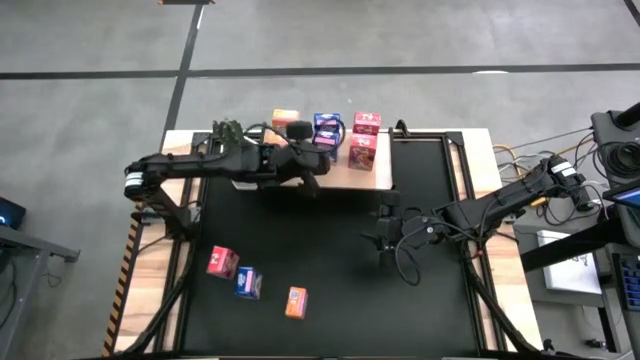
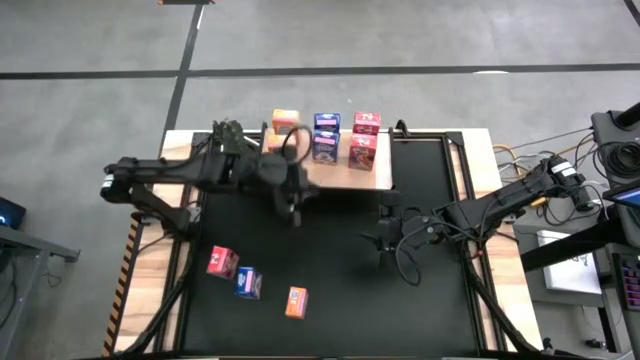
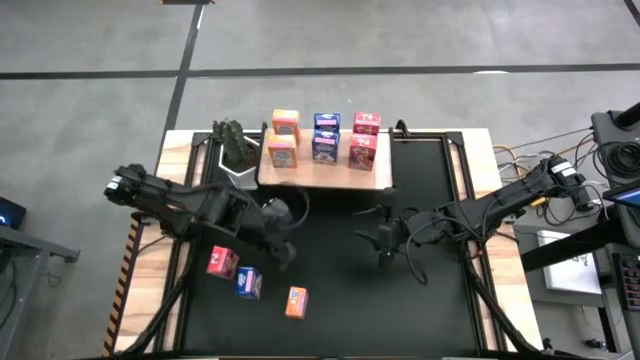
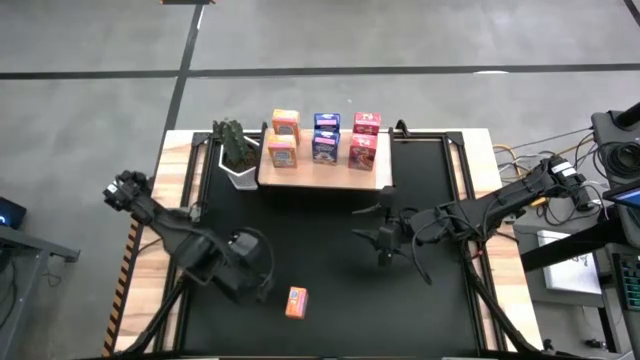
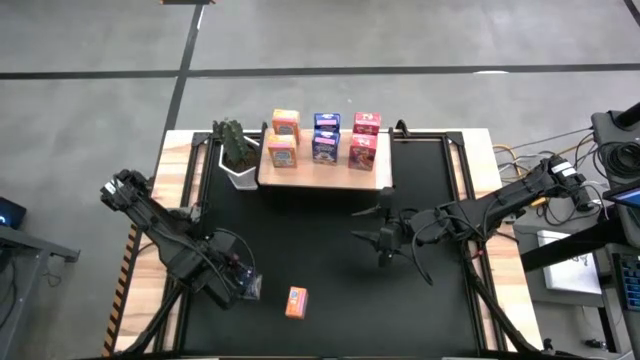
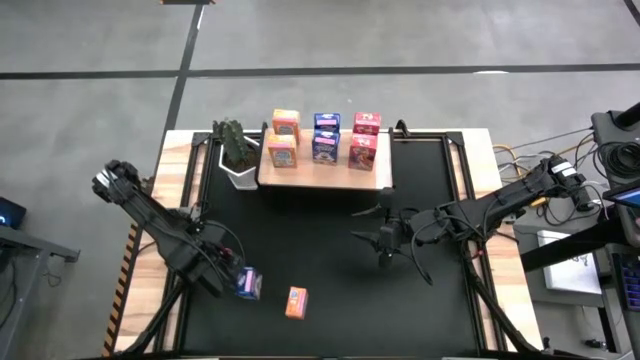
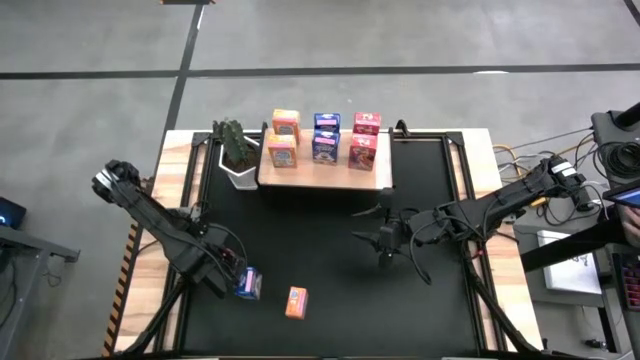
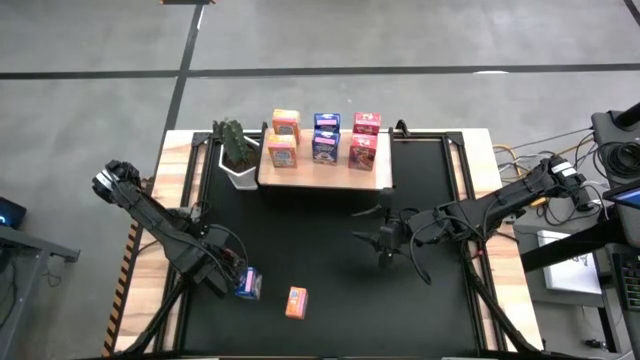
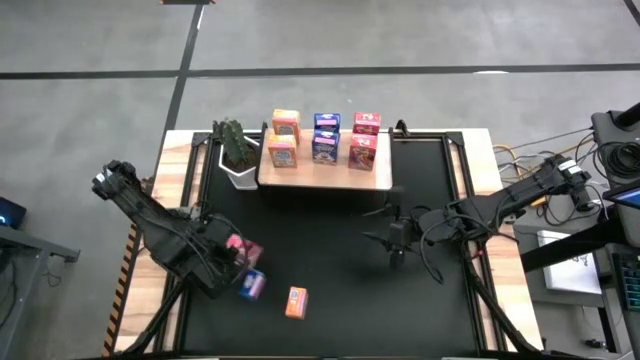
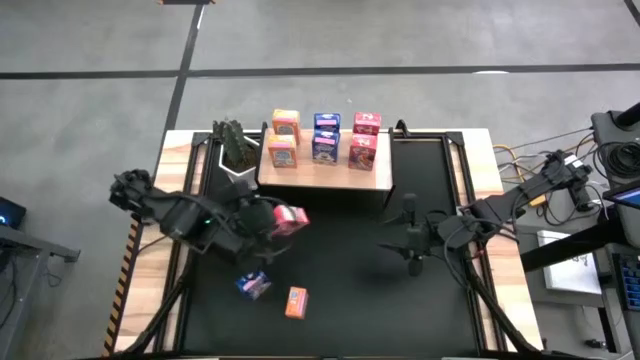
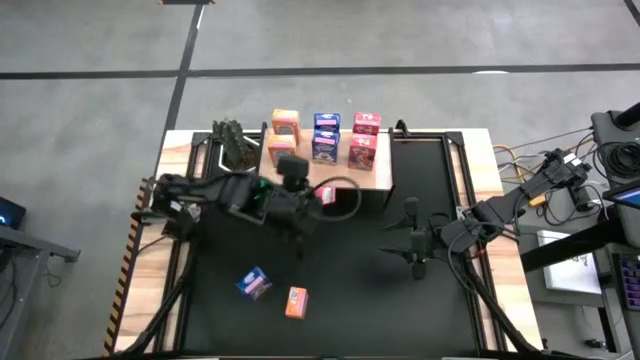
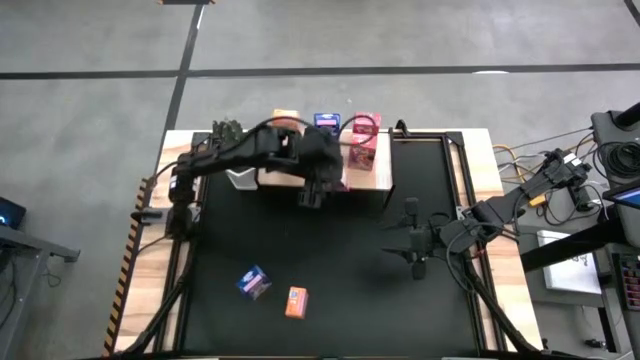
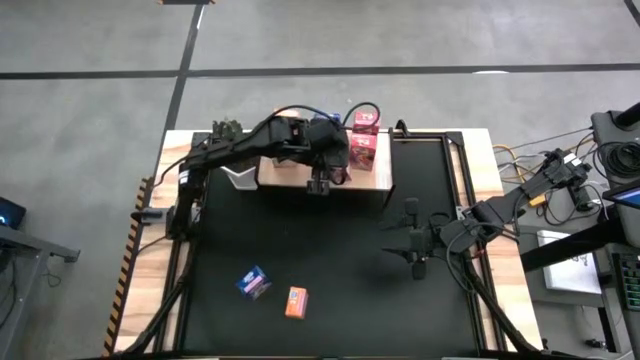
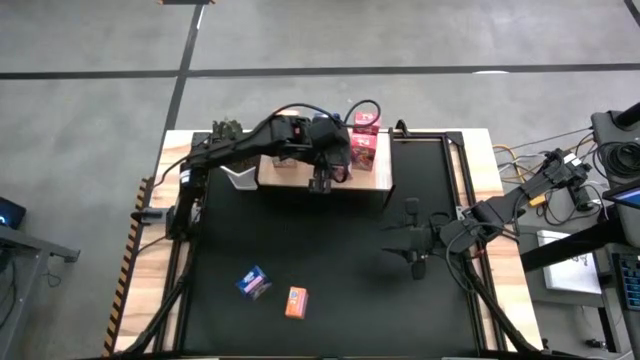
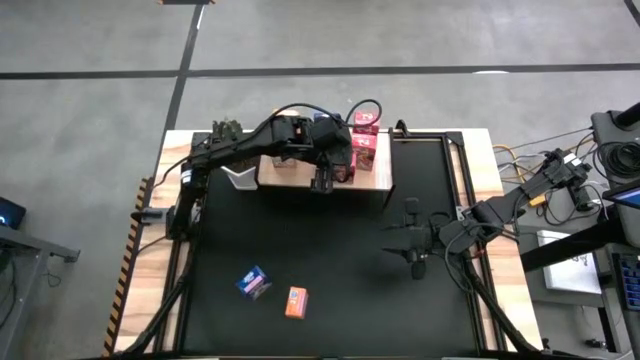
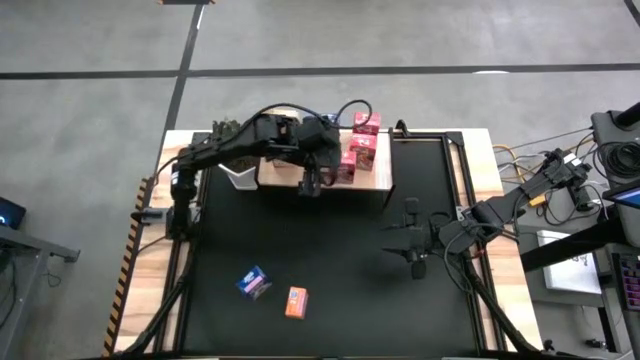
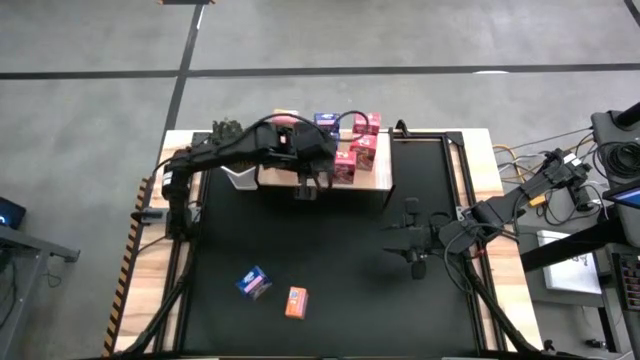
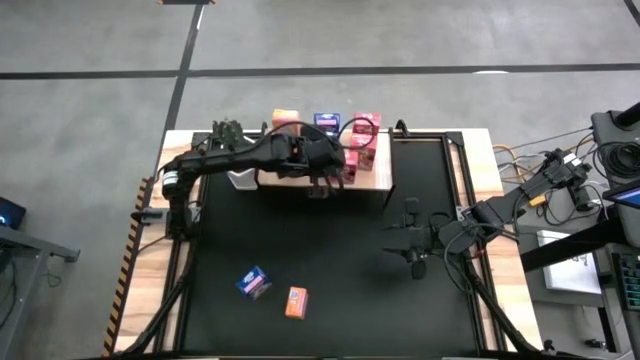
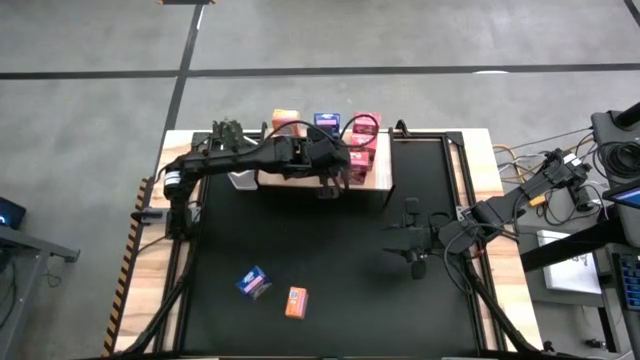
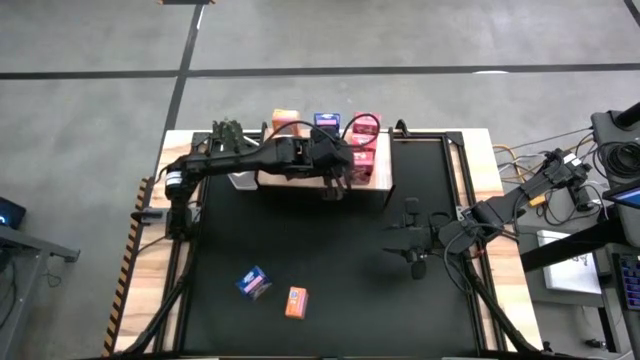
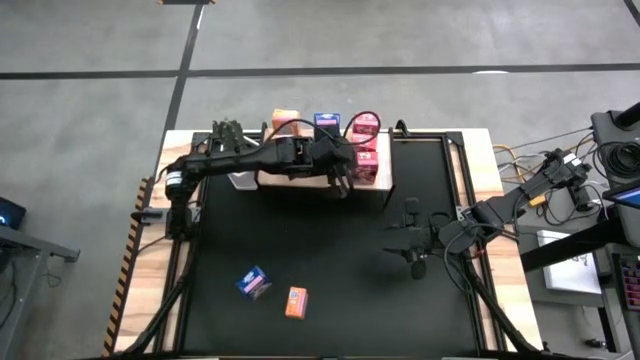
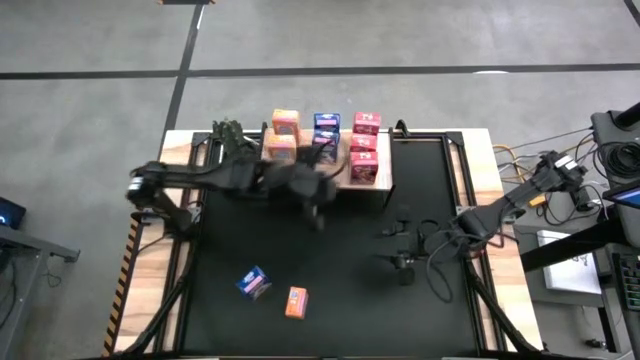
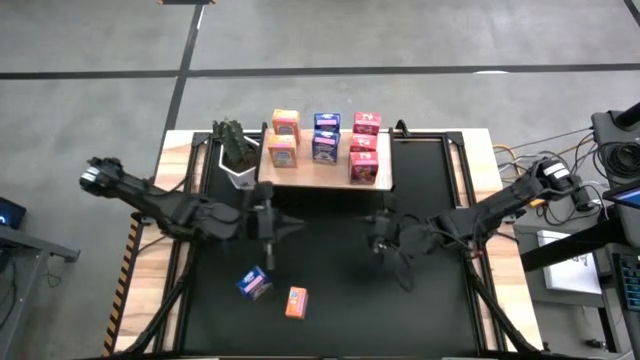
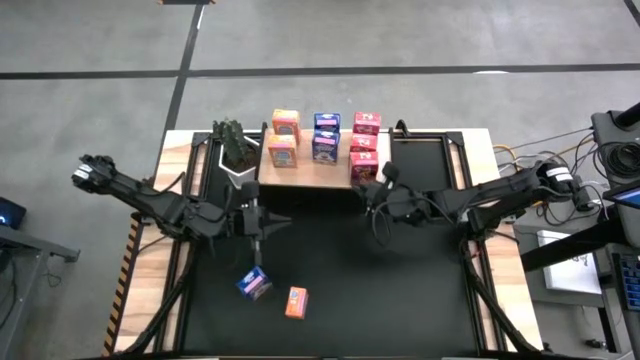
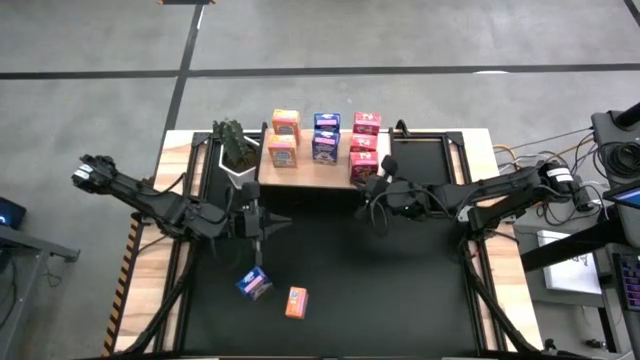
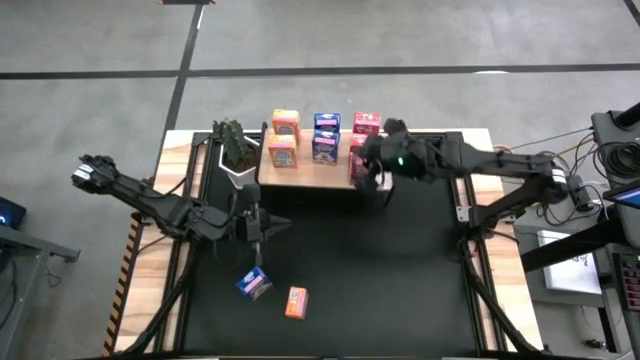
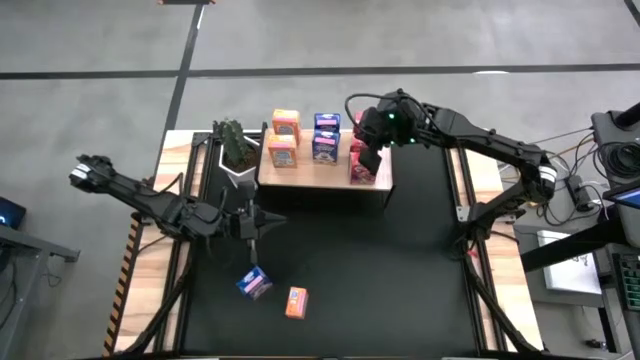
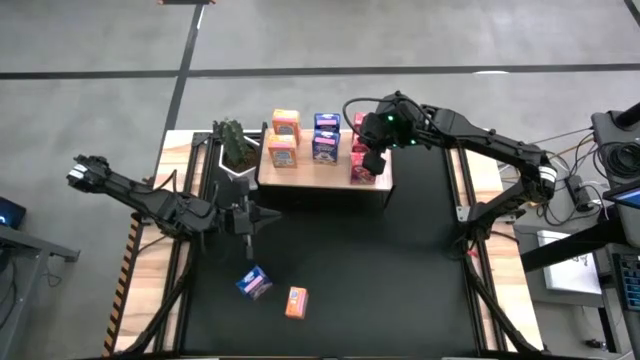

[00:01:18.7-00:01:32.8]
Task: Stack cereal on shelf
Put the red cereal box on the shelf aligned with the other red cereal boxes

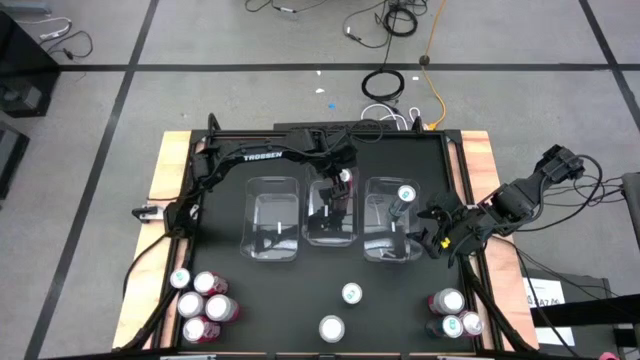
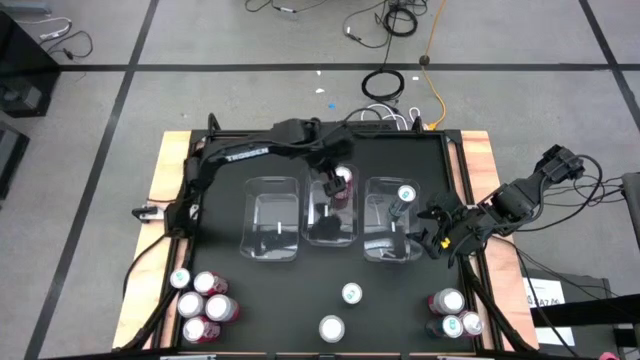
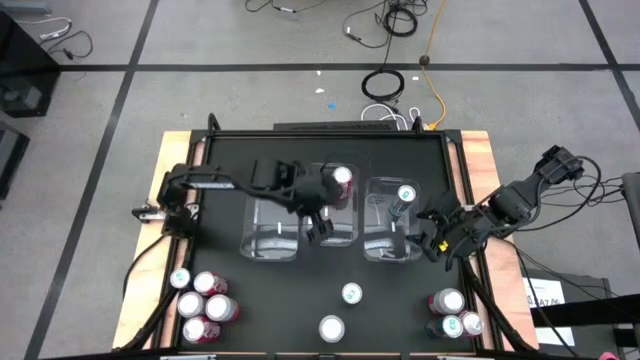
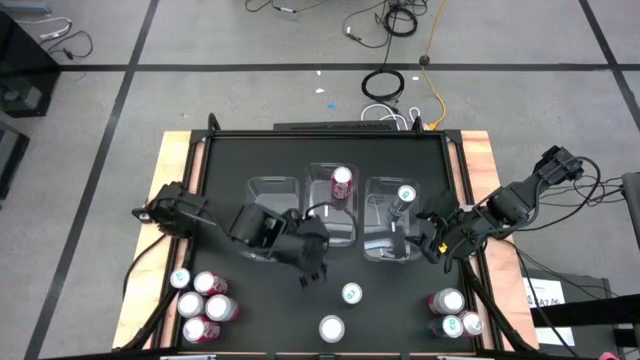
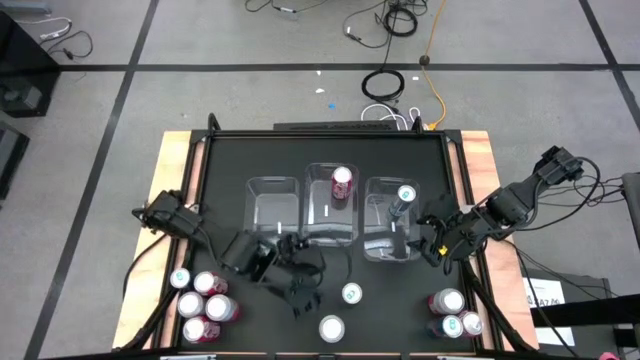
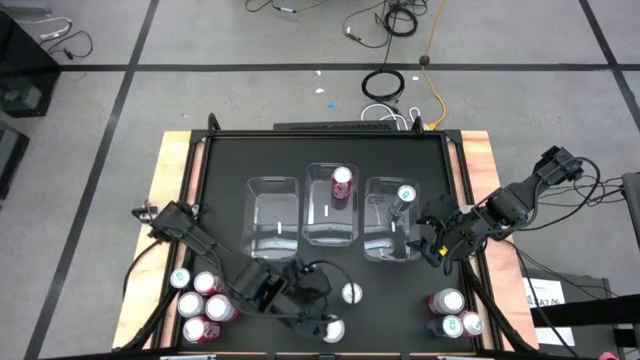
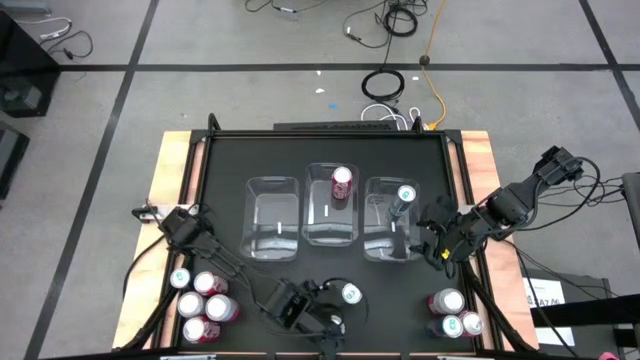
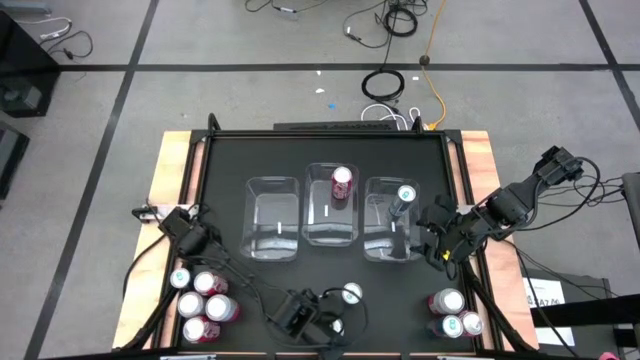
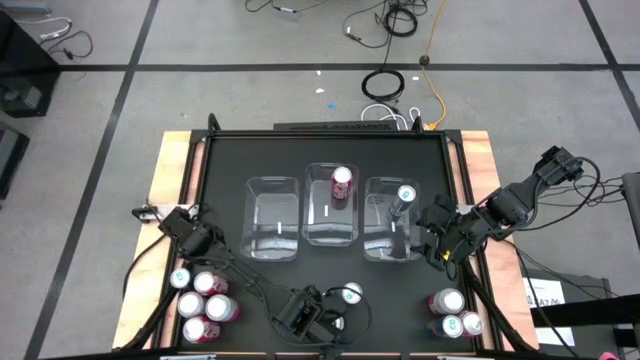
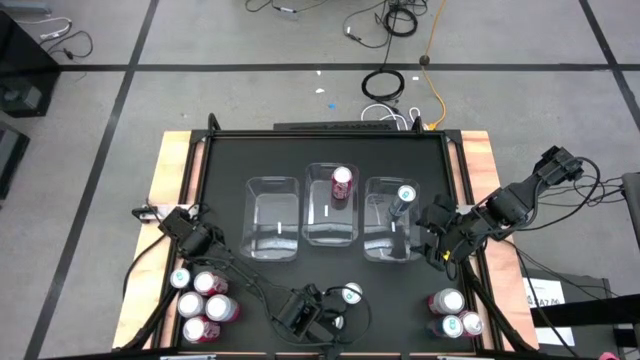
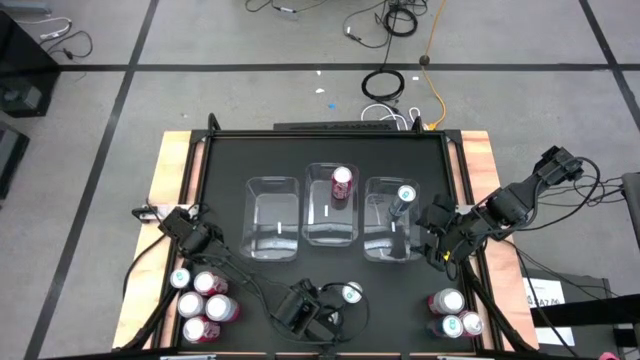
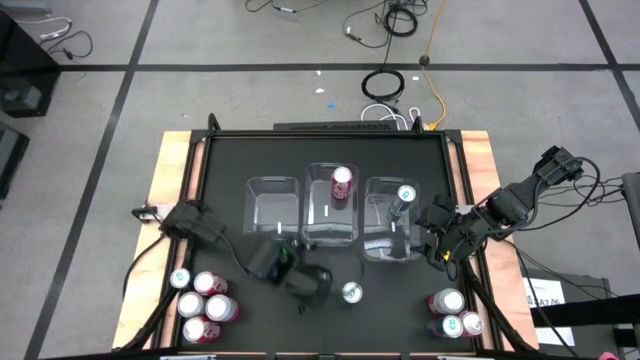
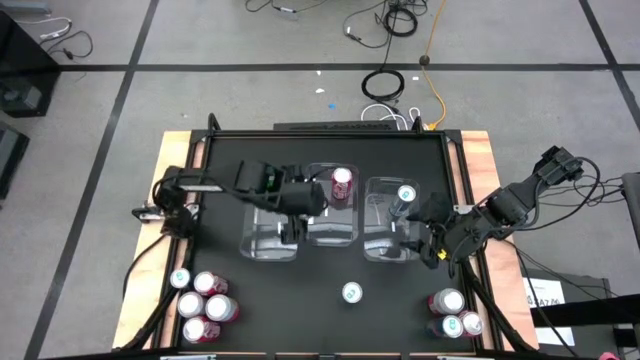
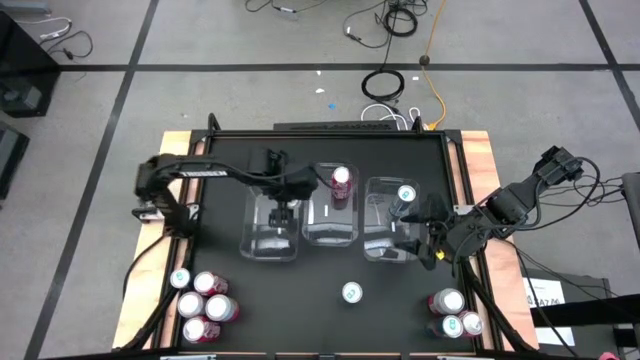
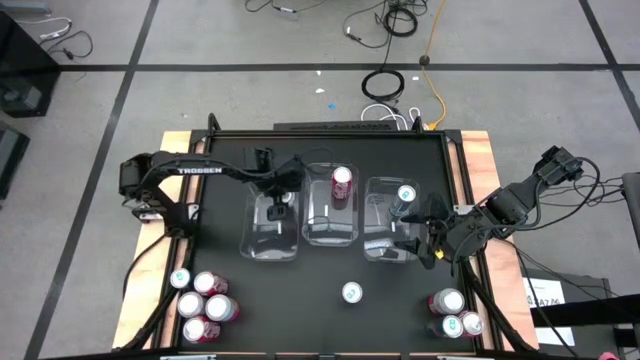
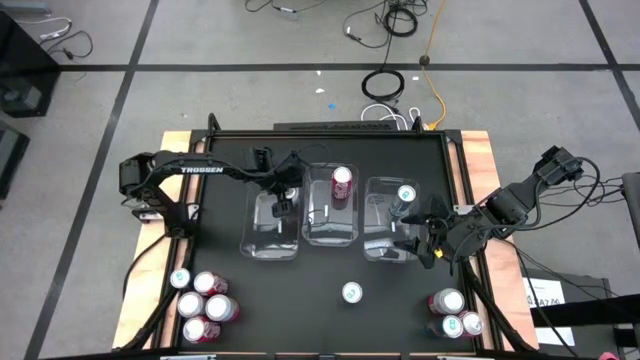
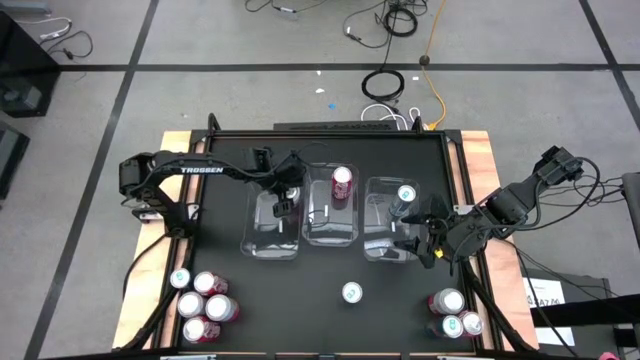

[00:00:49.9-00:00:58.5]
Task: Sort soda cans
Put the bottom center white orange soda can into the middle left transparent bin
